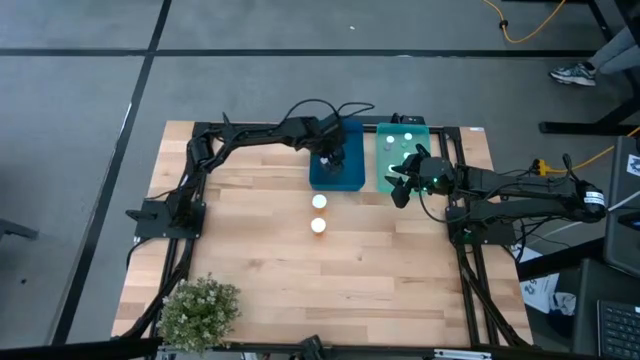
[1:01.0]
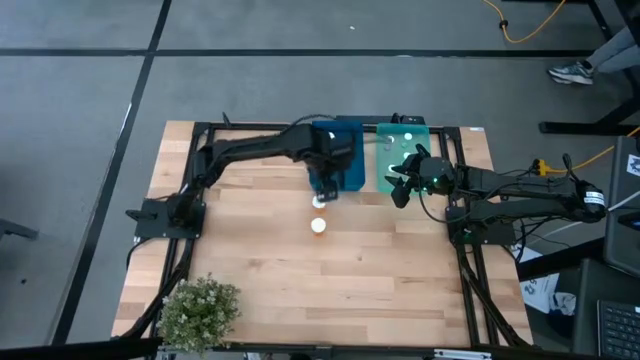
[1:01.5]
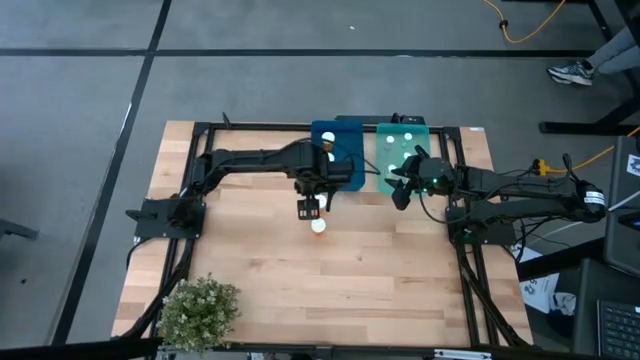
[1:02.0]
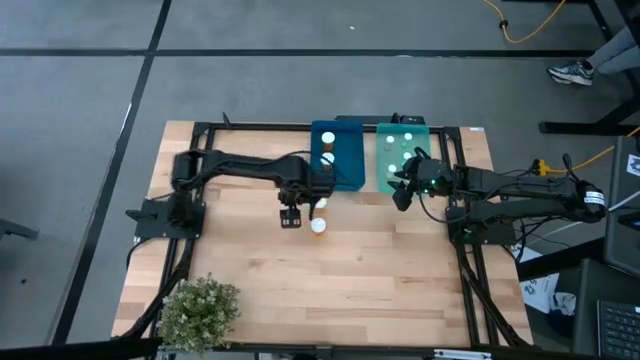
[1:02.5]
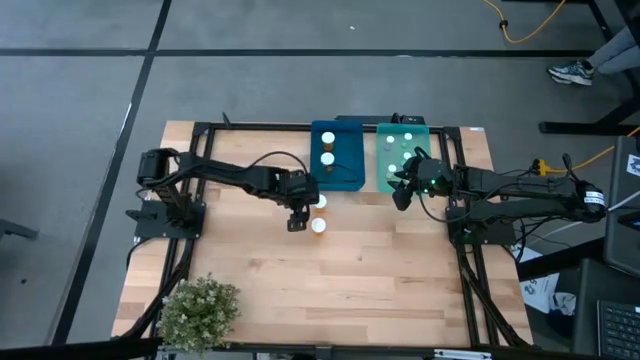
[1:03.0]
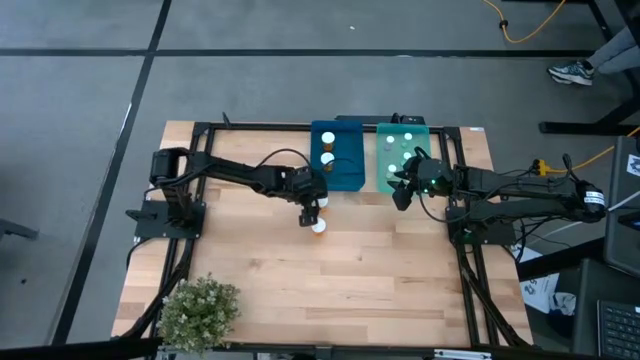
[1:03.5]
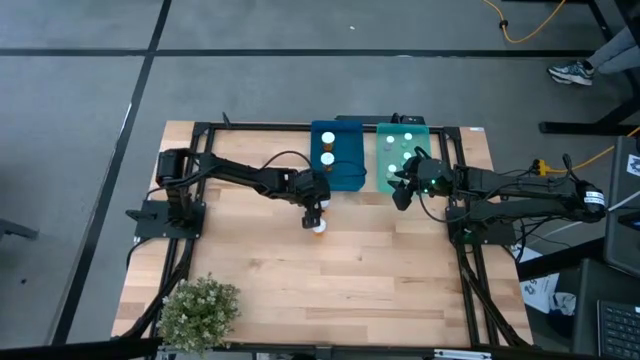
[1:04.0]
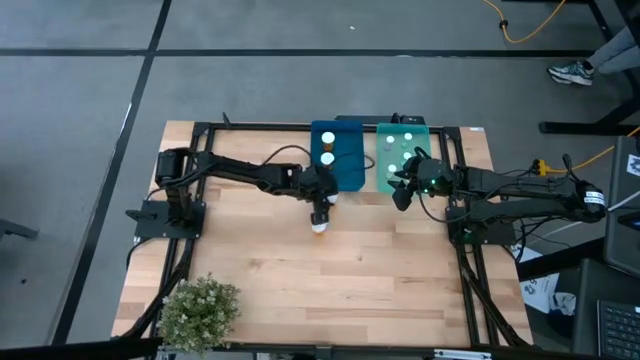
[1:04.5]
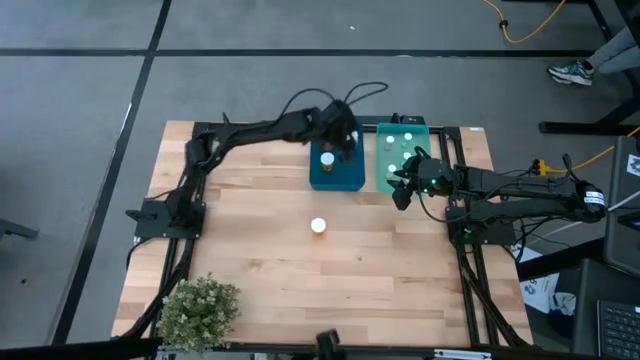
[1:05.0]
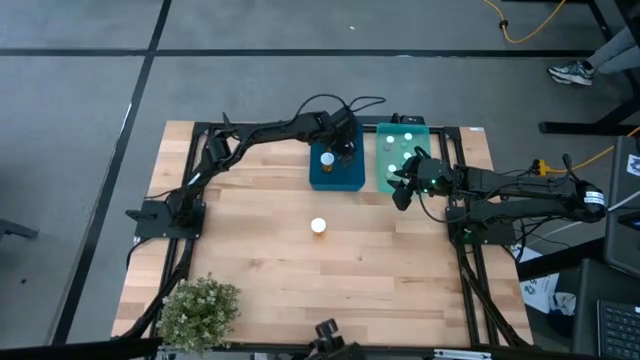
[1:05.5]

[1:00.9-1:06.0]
Task: Pick and place medicine bottles into bin by pill shape (circle, oval)
Put the orange pill bottle into the blue bin

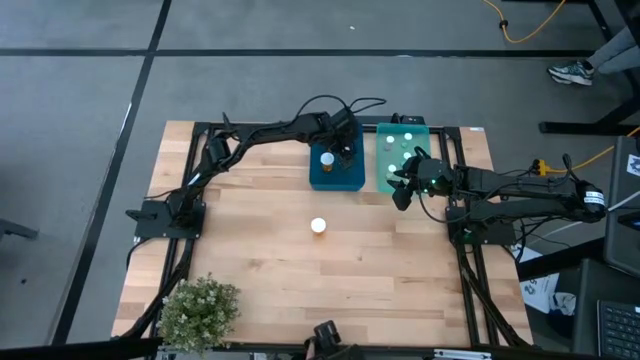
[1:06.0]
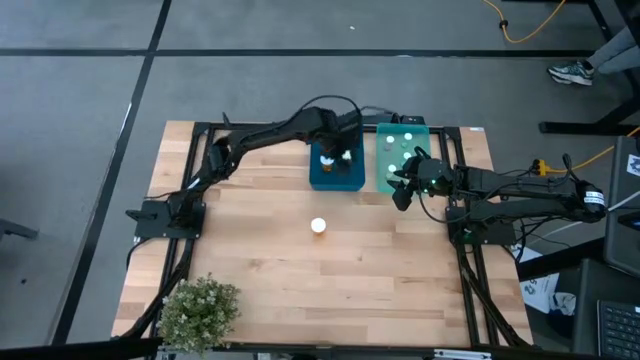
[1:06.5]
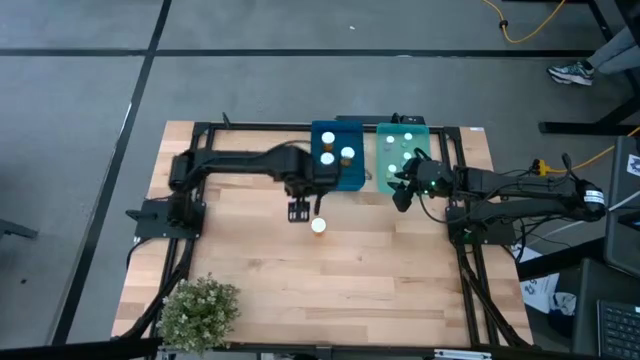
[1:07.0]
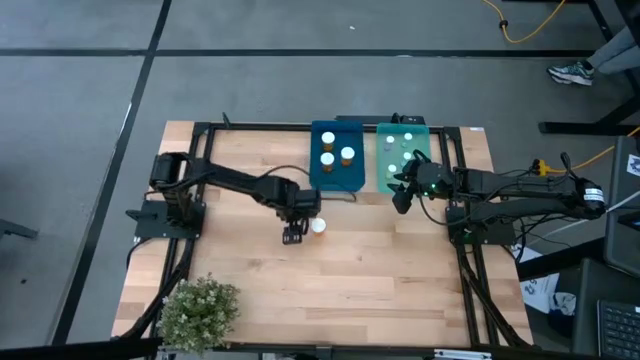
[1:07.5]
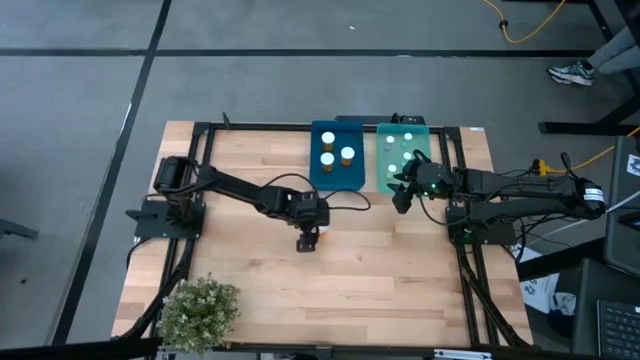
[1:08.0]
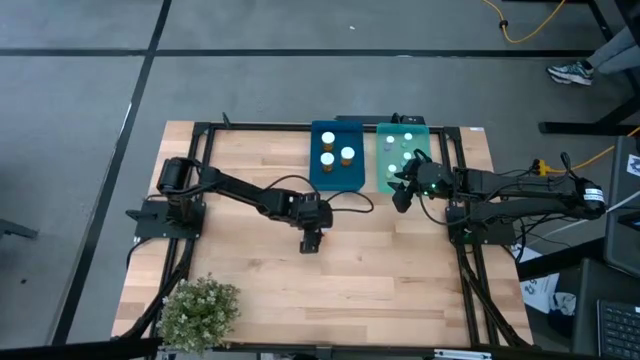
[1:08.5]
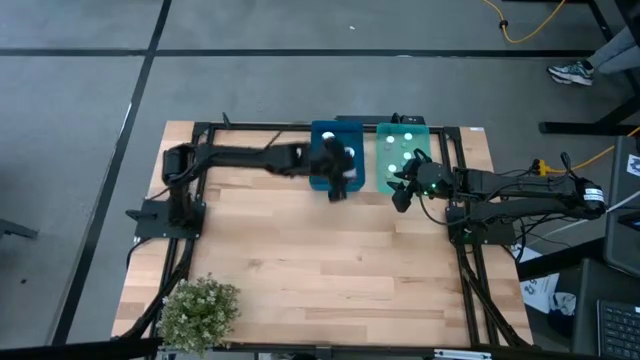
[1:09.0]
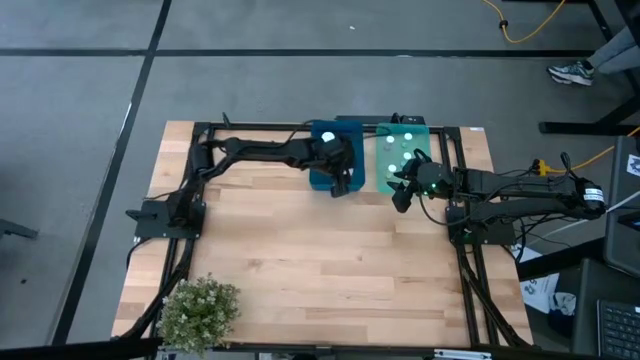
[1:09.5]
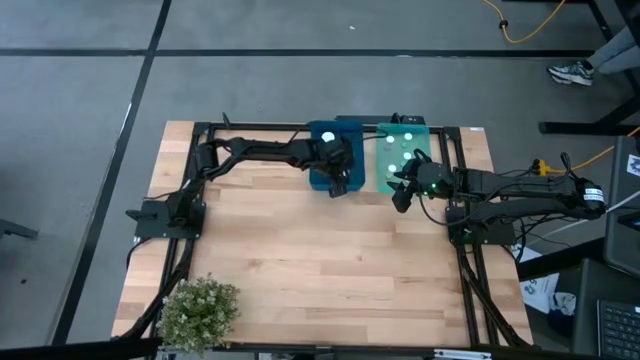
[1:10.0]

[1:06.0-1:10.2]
Put the orange pill bottle into the blue bin

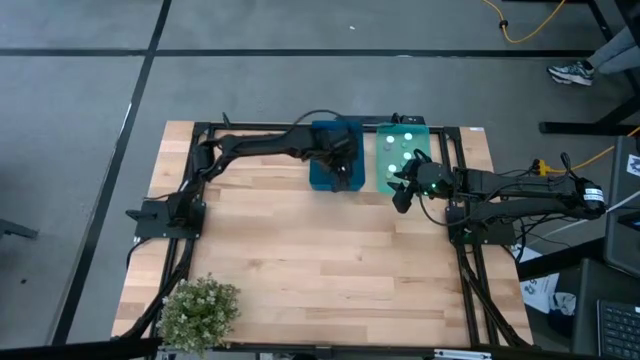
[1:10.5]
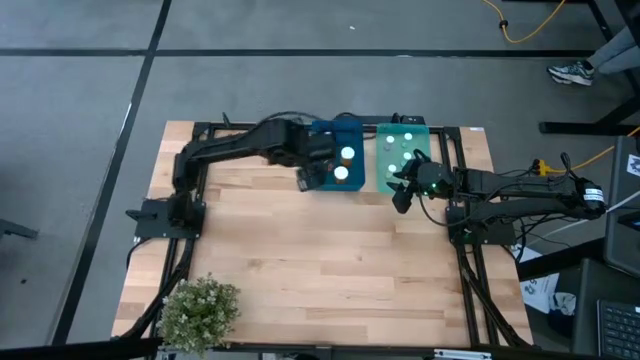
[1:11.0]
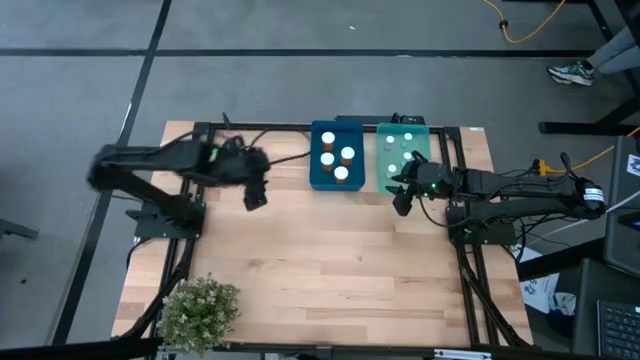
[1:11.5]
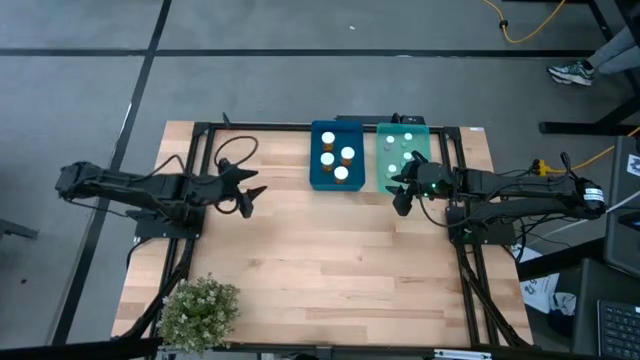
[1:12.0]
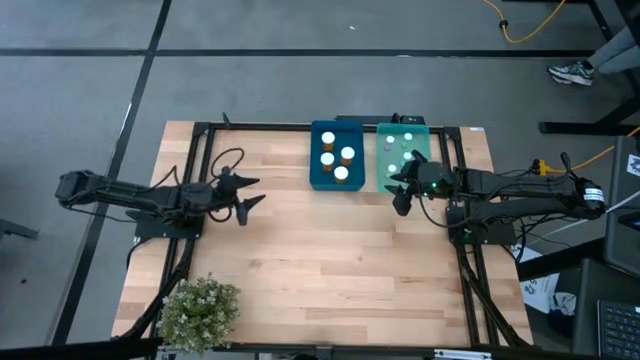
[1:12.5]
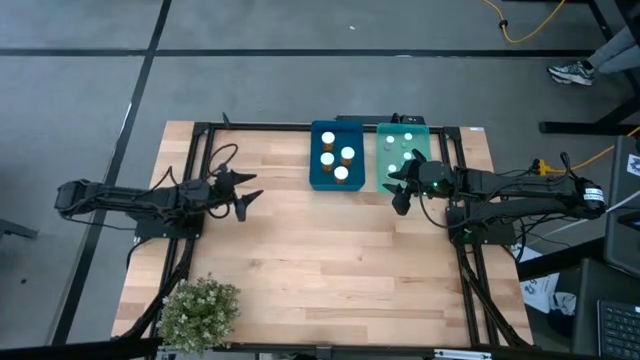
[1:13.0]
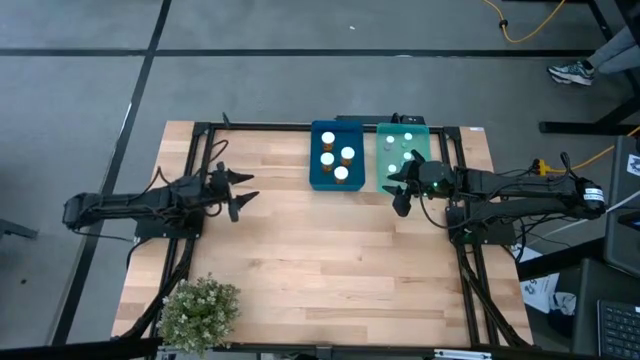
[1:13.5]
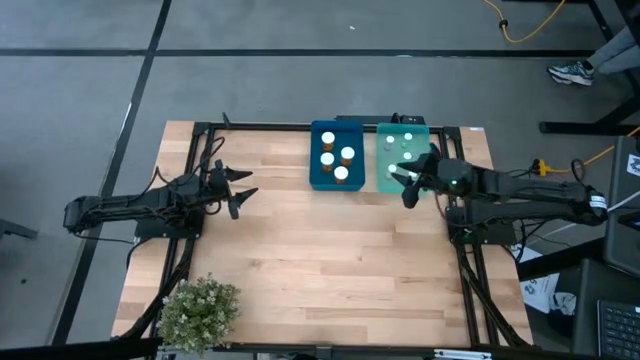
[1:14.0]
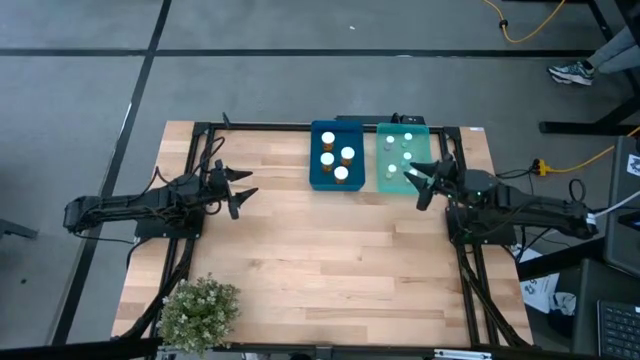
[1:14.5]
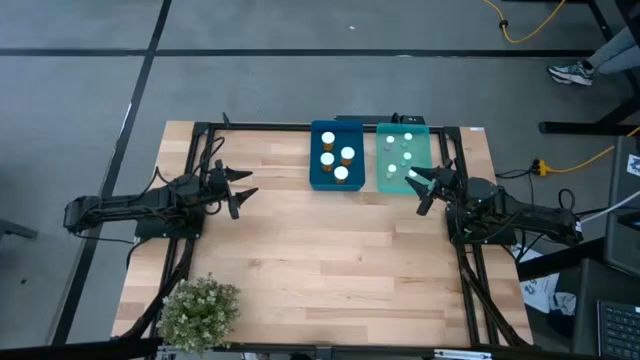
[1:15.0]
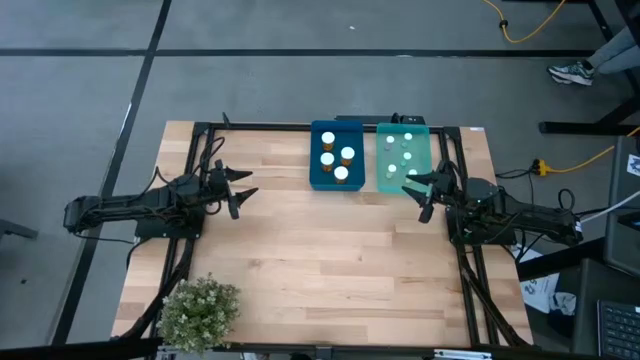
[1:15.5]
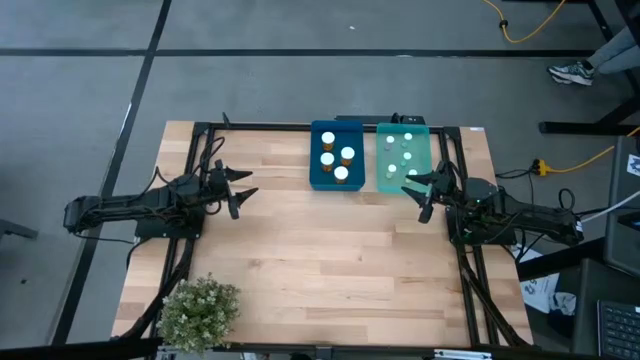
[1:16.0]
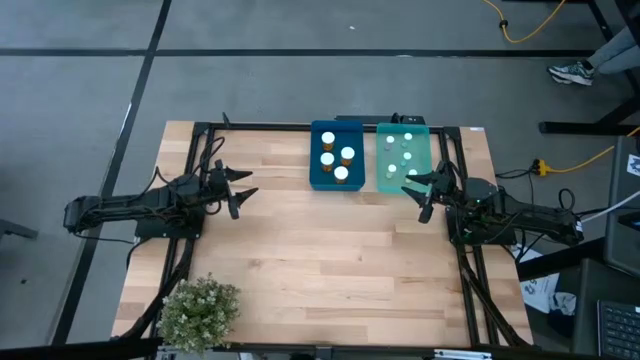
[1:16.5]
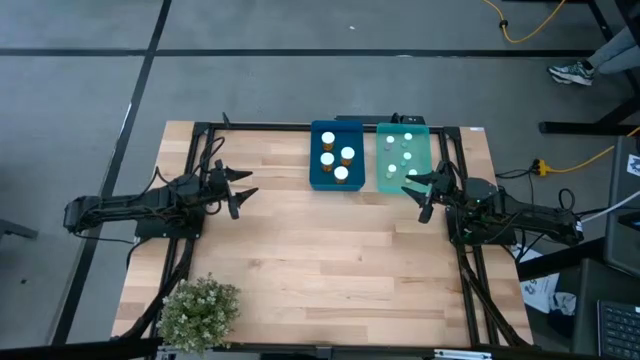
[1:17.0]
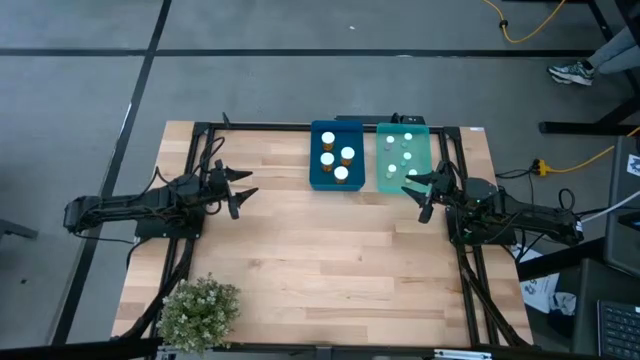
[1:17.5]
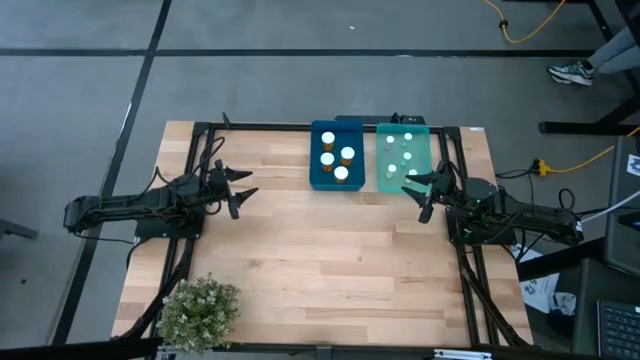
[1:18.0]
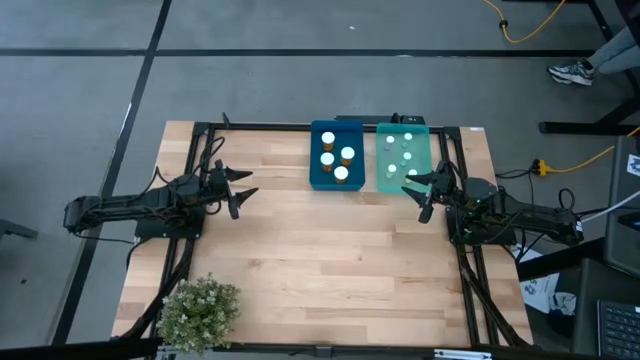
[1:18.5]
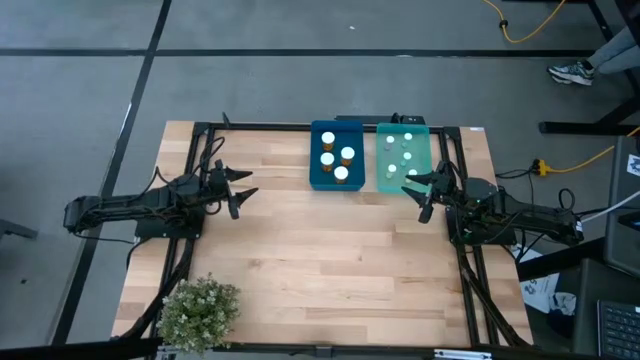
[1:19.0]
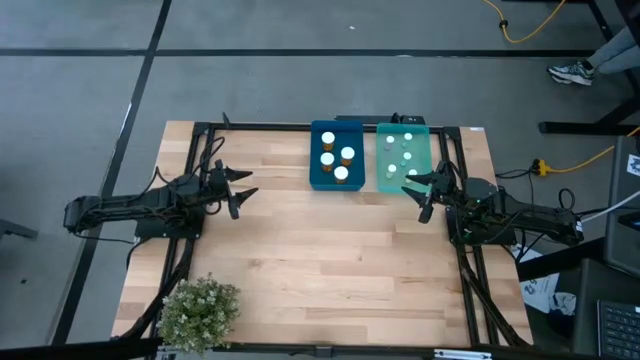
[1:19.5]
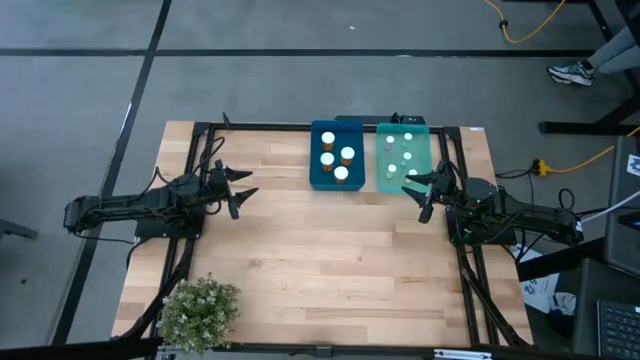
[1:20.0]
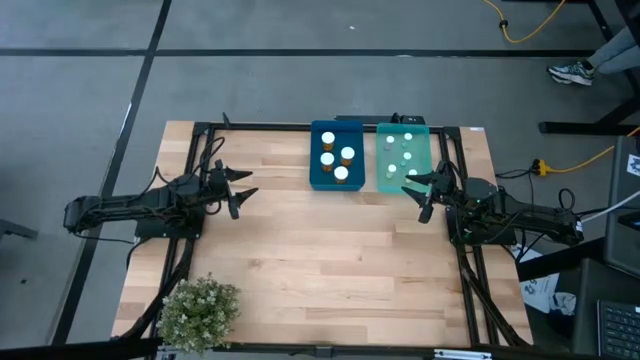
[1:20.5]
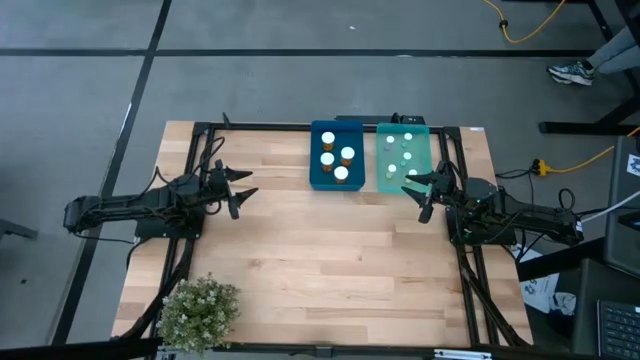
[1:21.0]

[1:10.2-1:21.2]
Return to Home Position

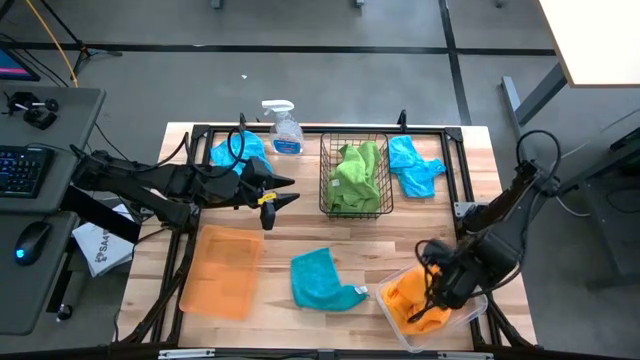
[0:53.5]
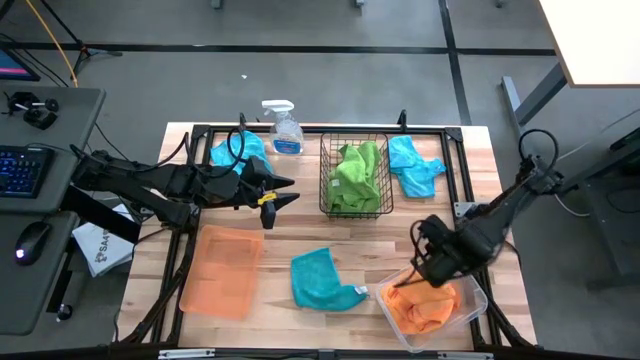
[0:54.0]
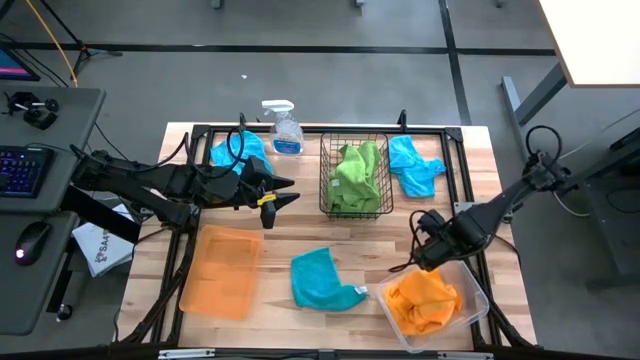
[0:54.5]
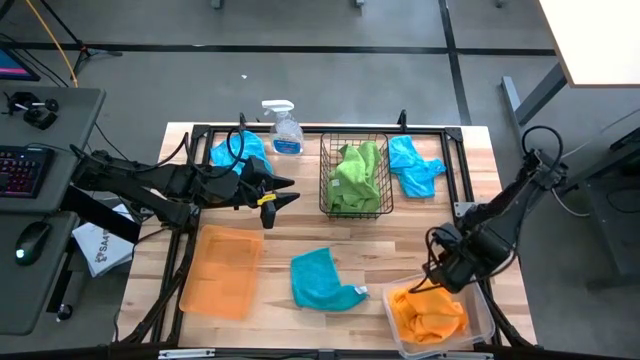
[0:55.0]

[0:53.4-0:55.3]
Task: Sort microfiber towel by color & place in baskets
Adjust the transparent bin
